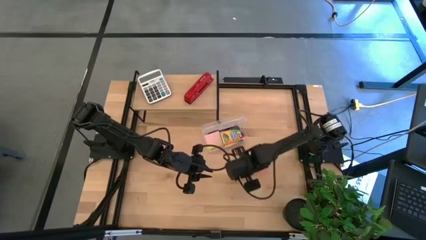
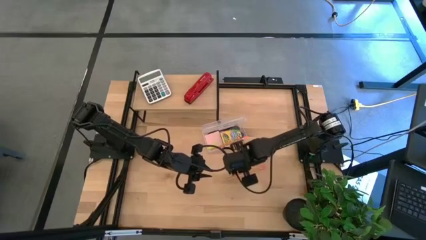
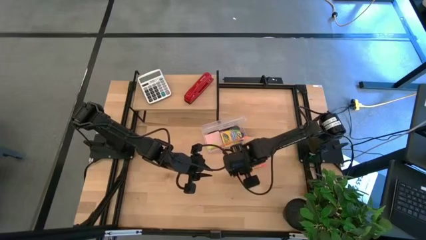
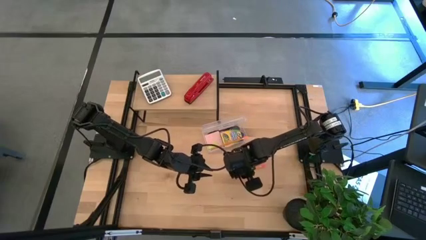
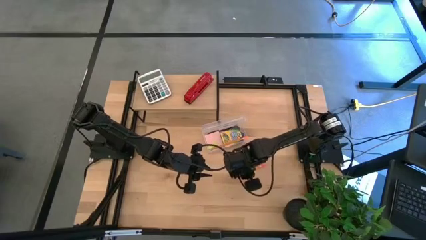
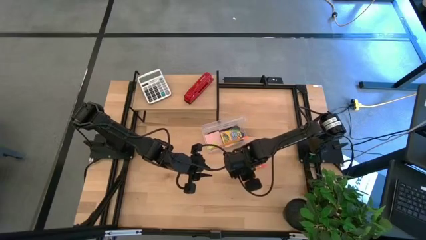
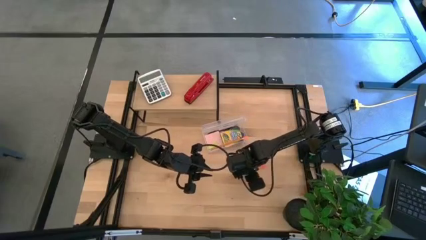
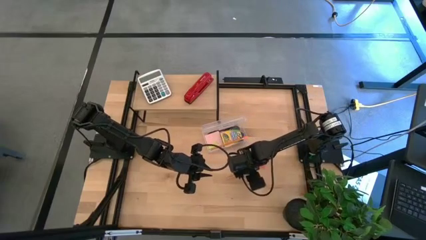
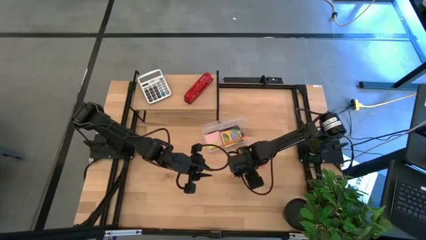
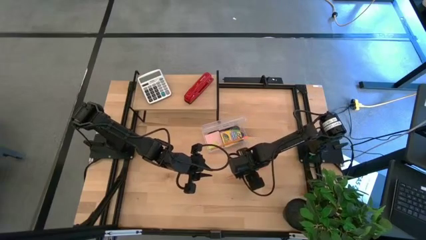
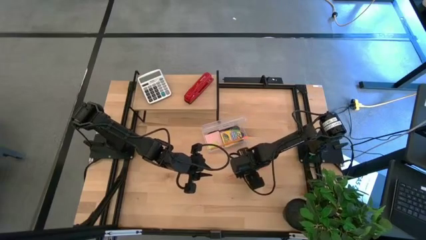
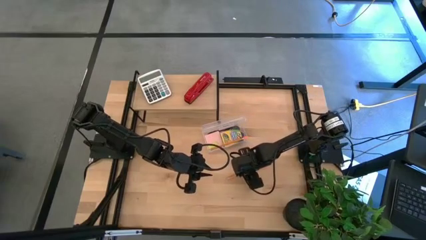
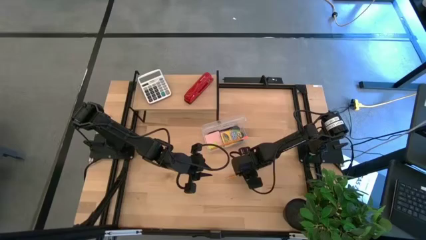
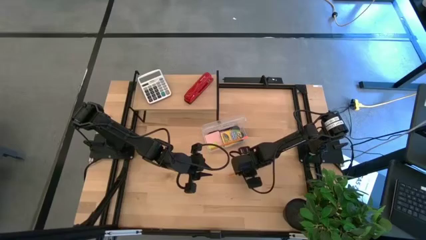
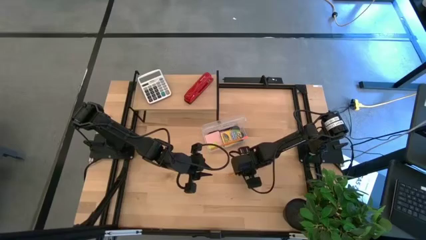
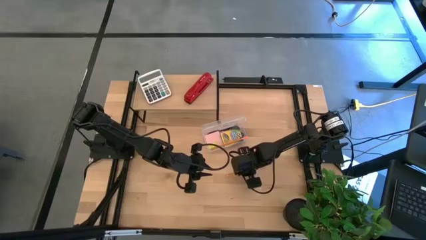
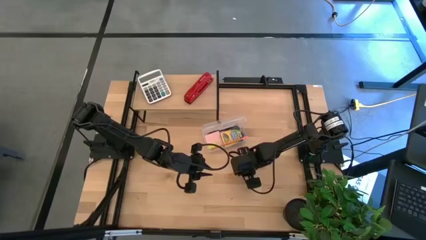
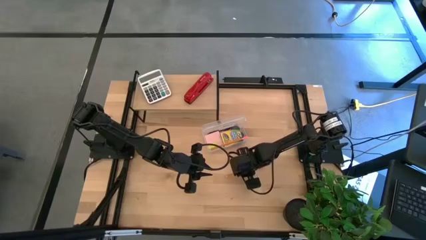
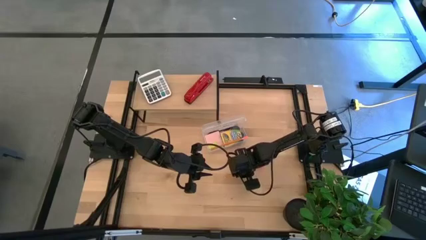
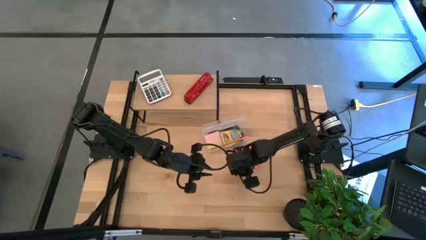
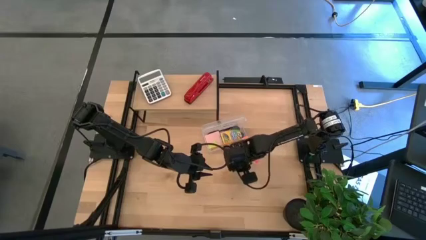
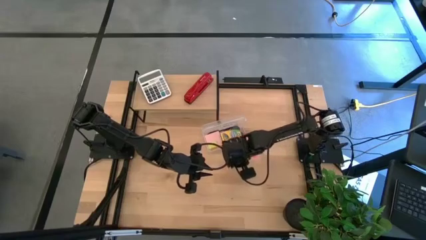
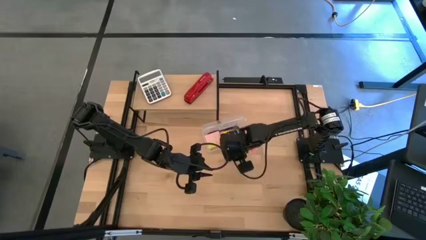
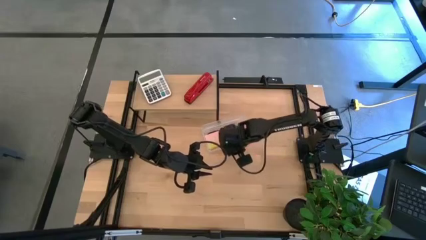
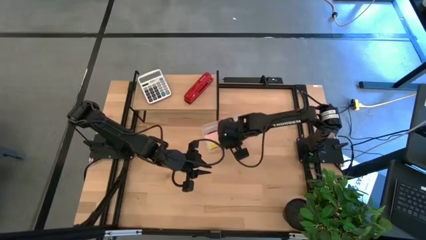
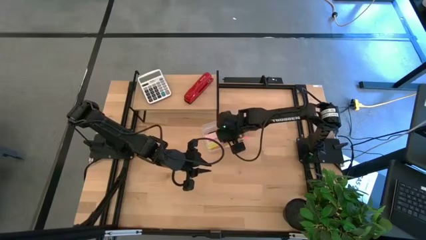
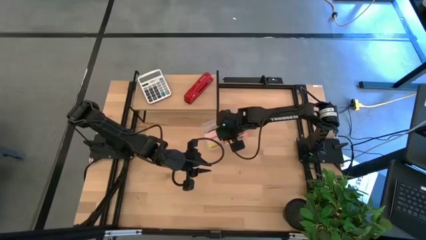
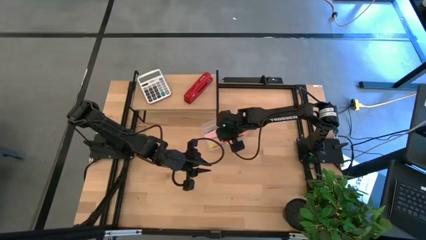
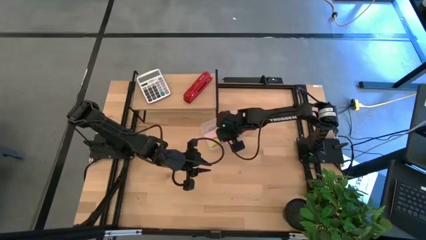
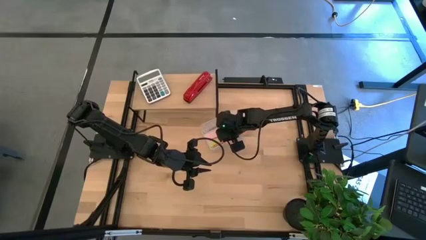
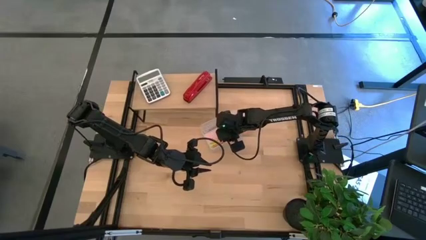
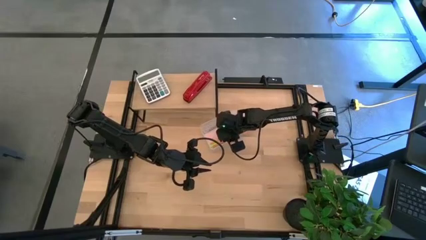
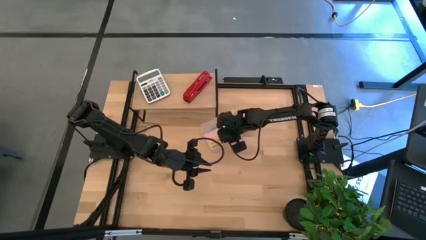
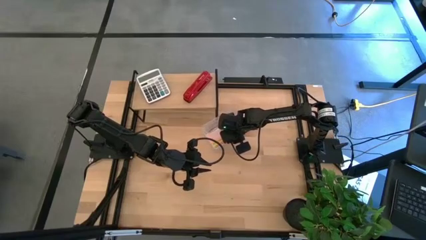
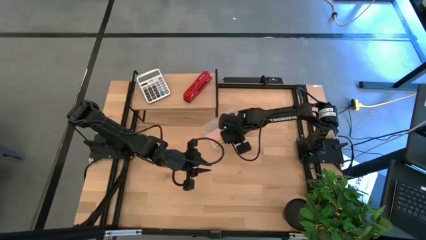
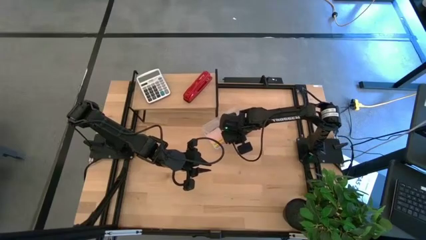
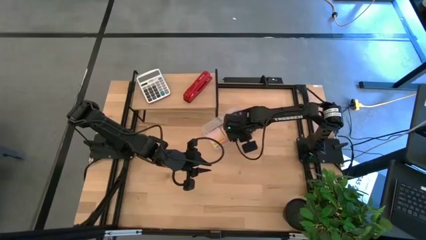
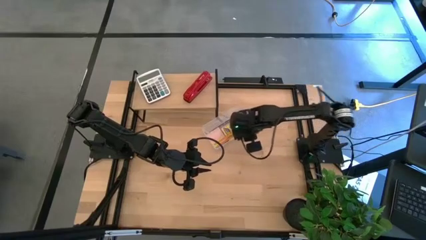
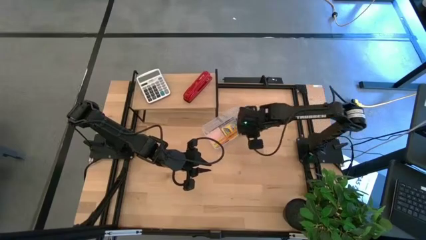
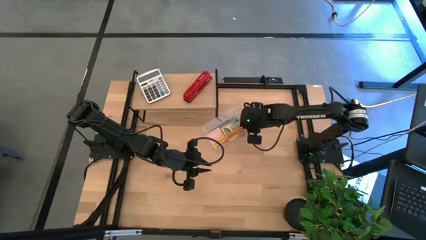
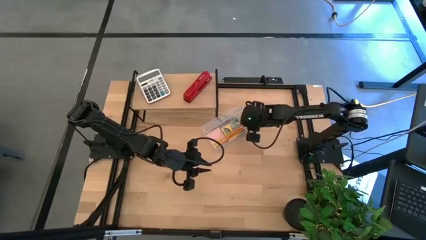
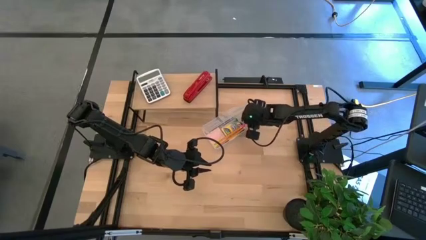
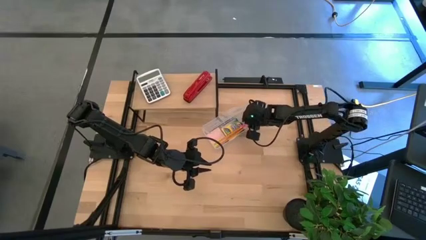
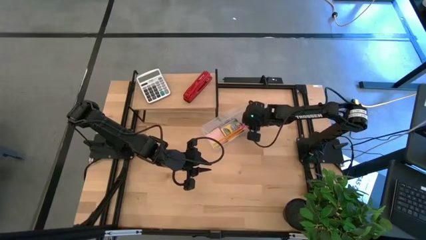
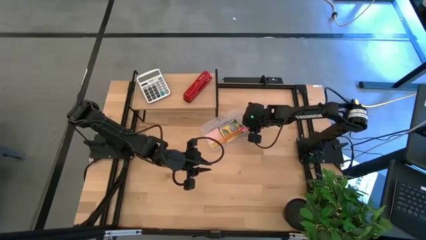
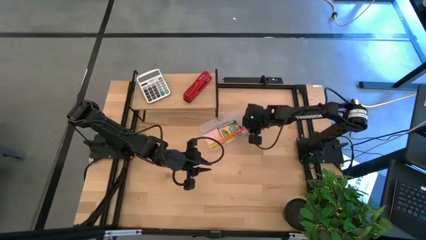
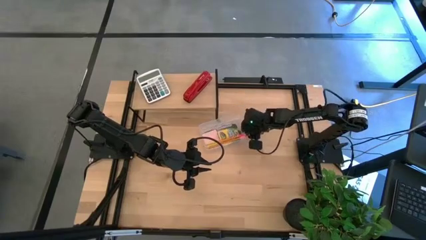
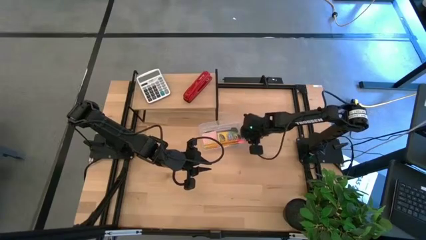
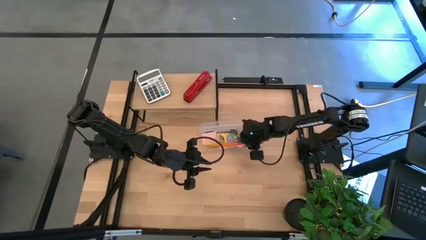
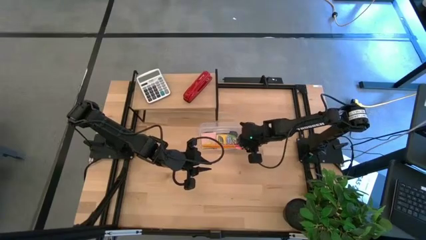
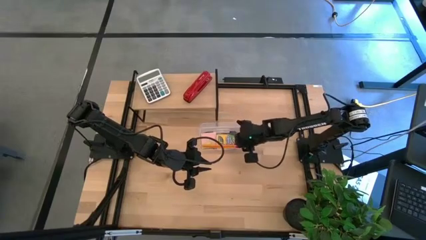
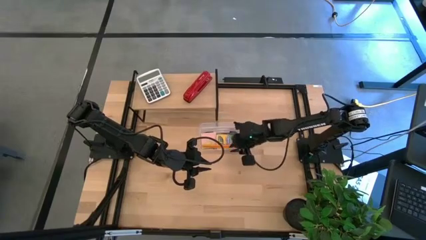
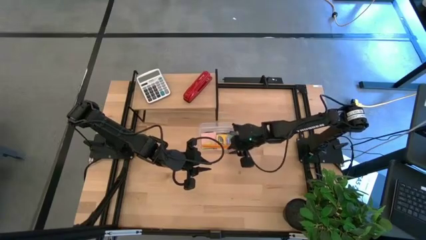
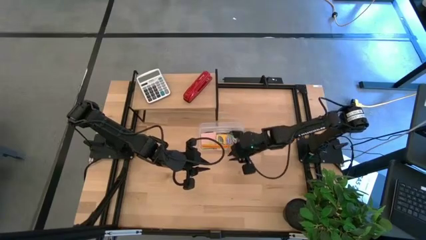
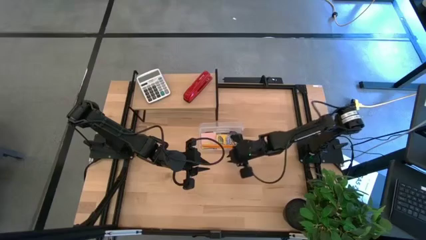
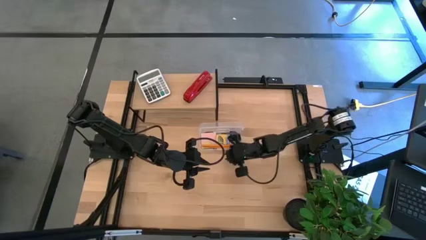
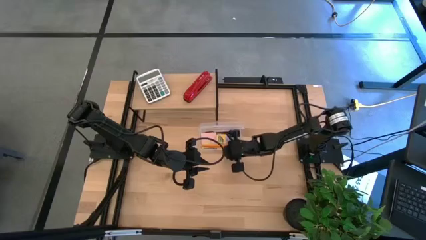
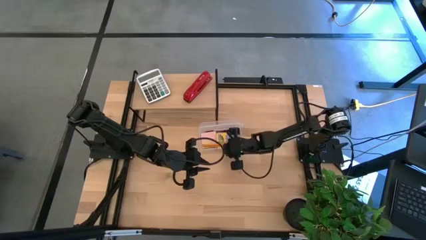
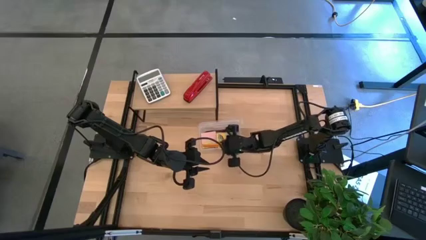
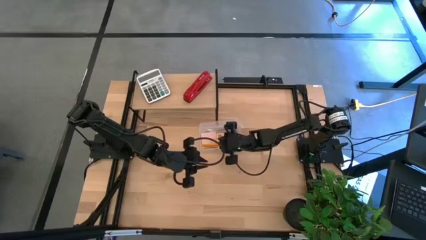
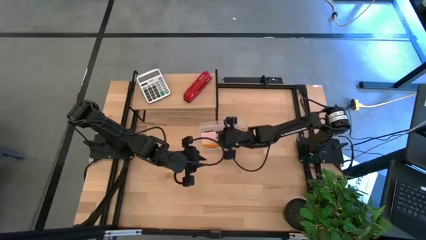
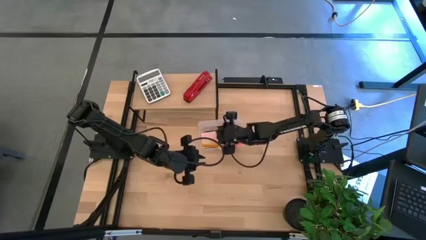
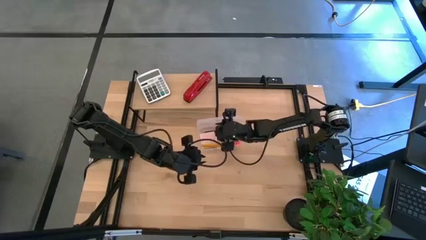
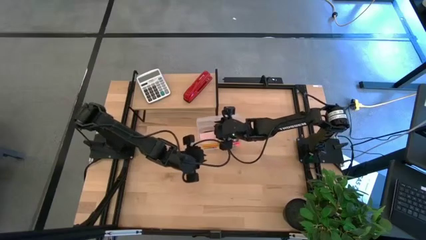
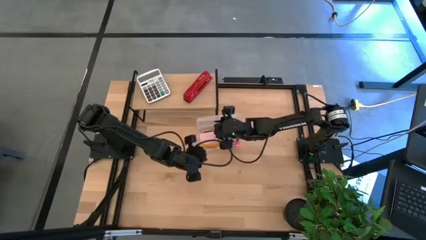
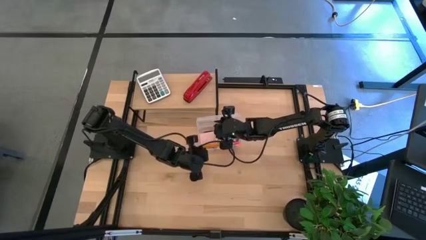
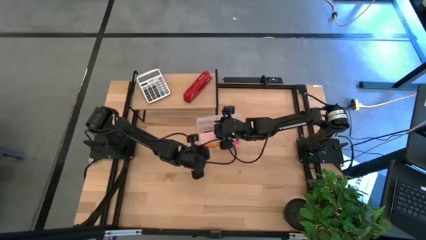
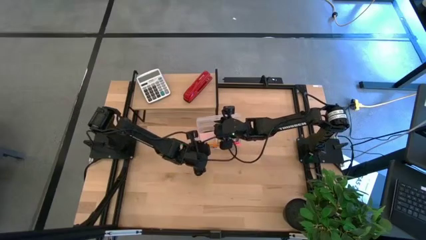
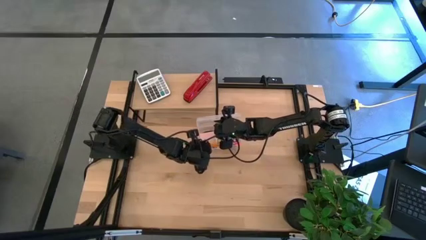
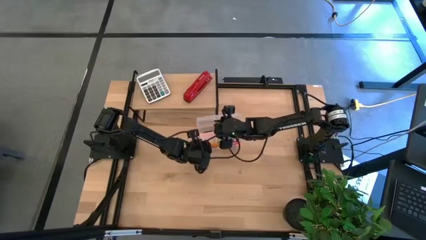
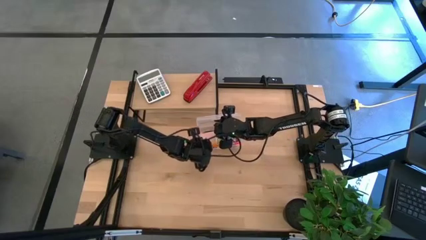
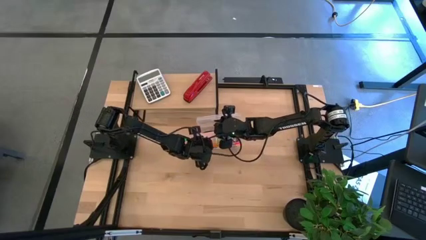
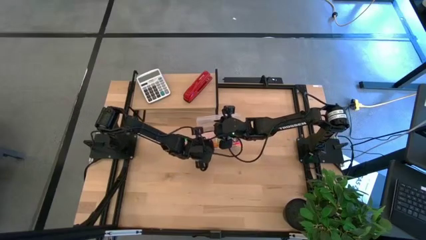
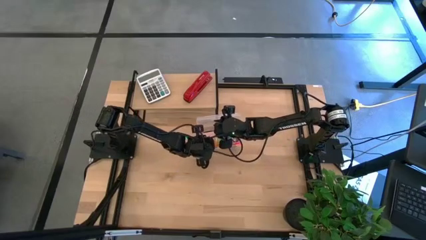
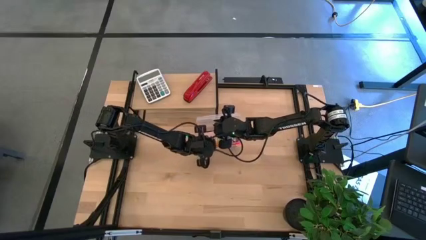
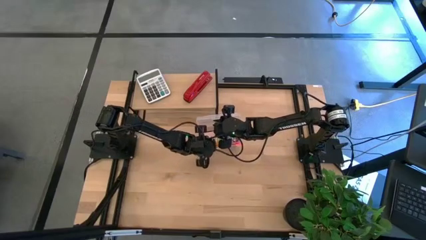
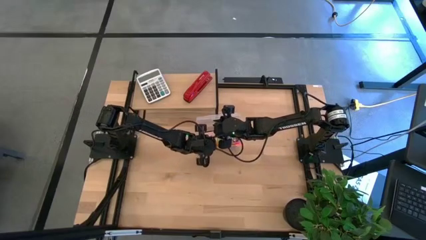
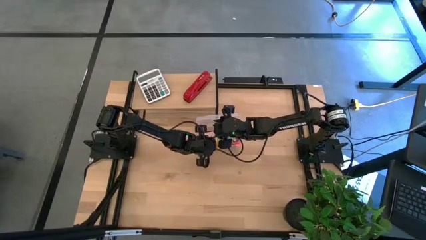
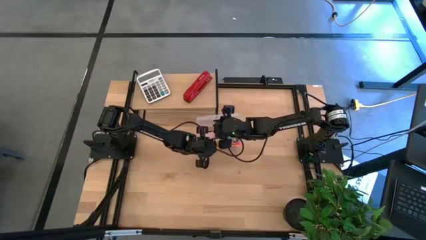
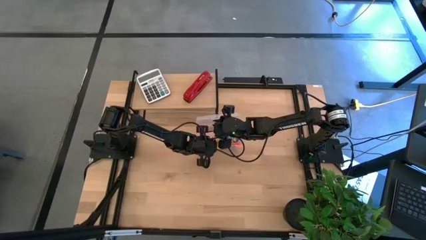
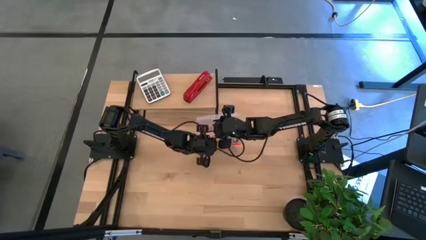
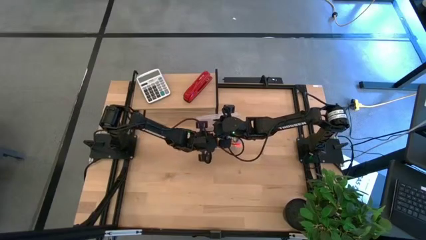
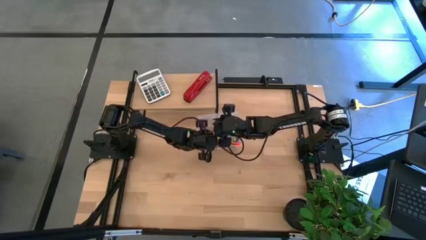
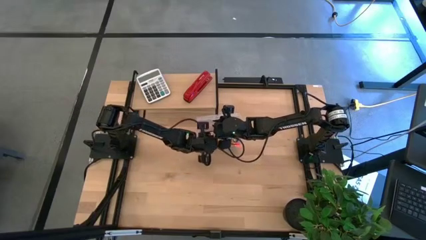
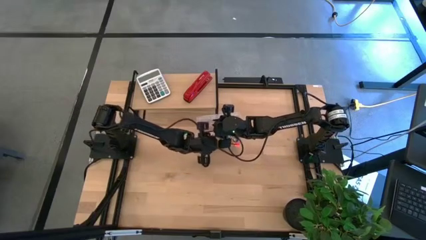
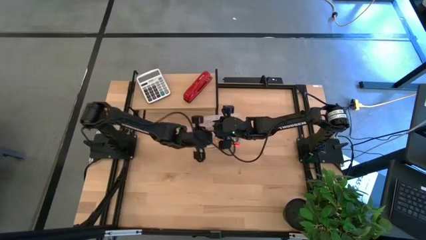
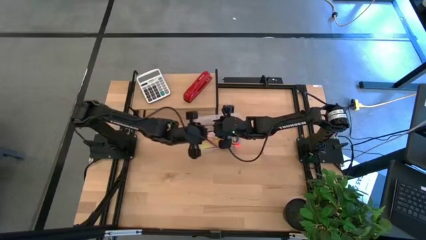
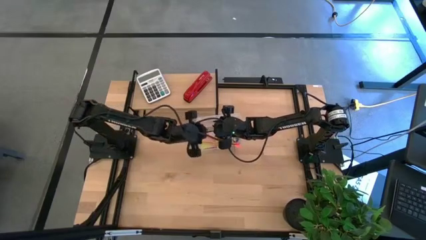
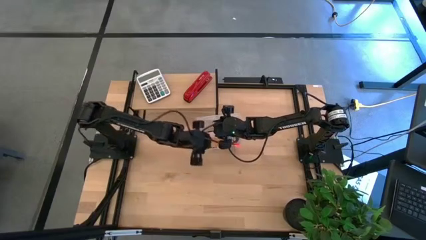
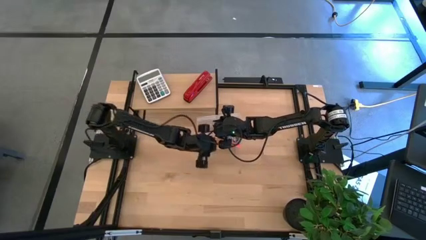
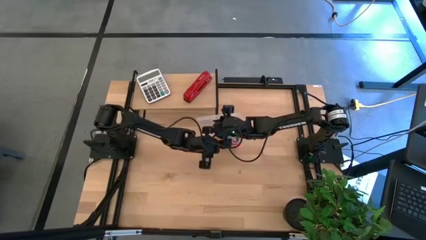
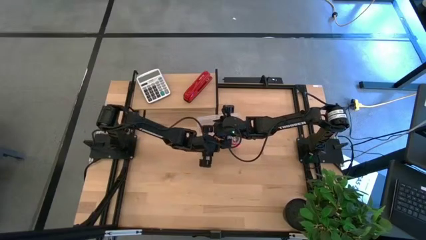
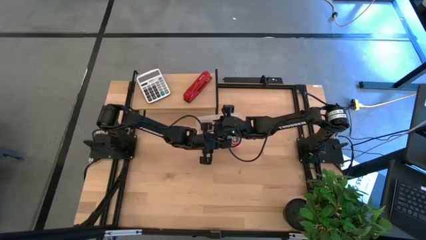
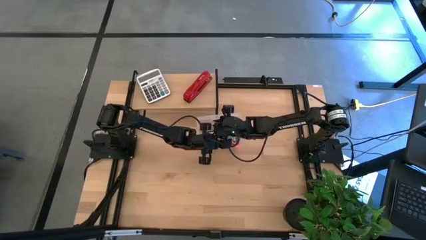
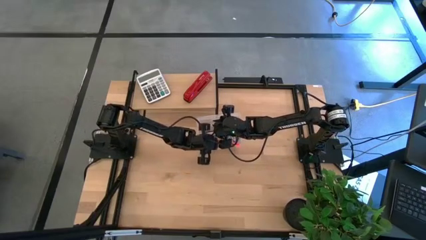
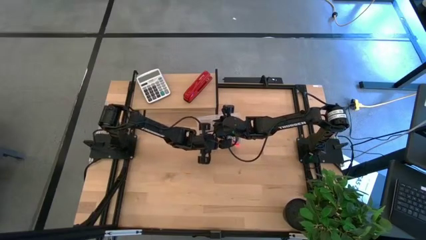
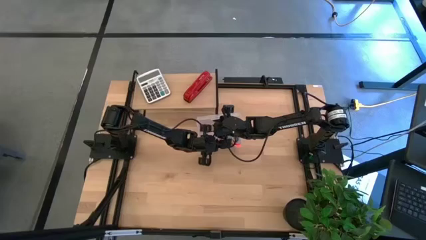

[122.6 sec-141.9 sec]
Task: Pack school essentials
Put the orange pencil into the supply box
